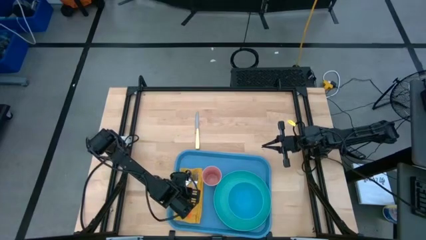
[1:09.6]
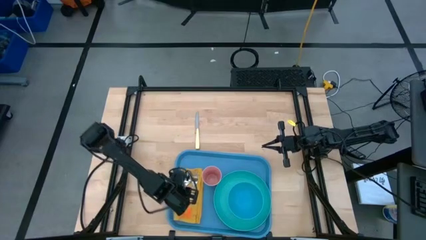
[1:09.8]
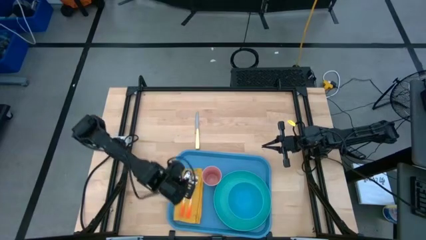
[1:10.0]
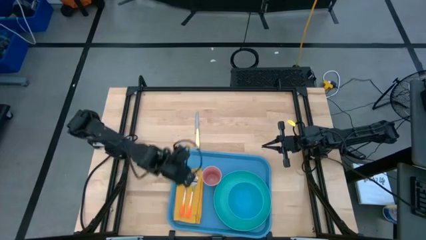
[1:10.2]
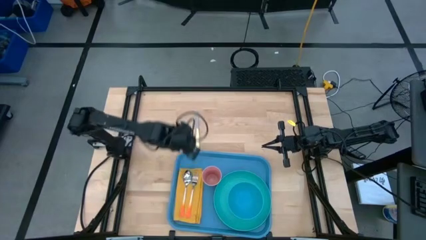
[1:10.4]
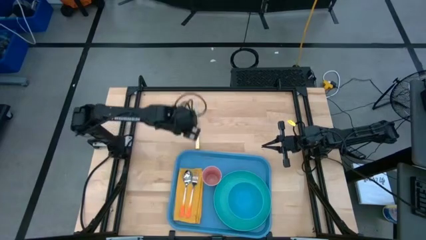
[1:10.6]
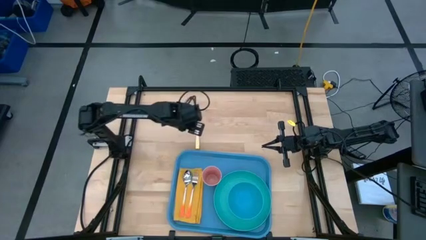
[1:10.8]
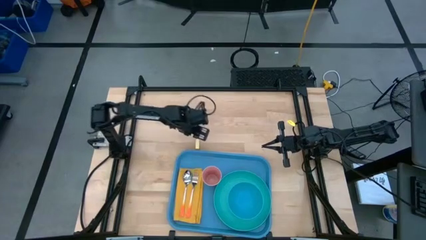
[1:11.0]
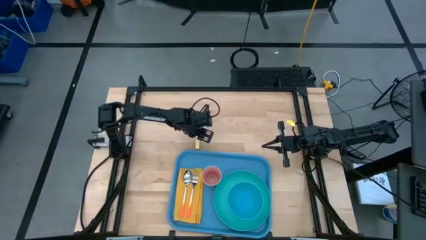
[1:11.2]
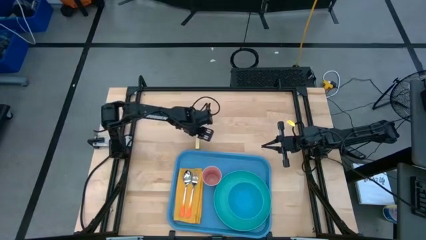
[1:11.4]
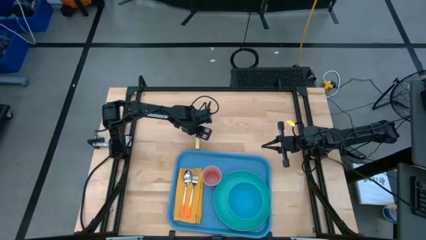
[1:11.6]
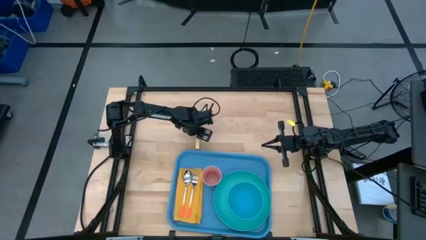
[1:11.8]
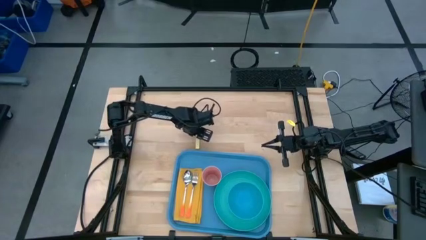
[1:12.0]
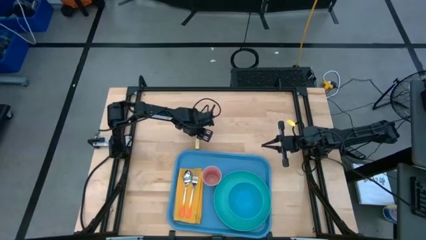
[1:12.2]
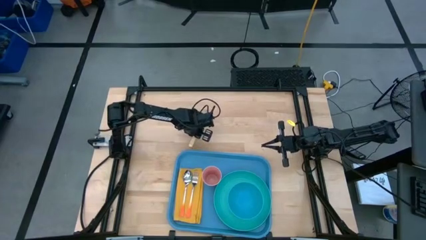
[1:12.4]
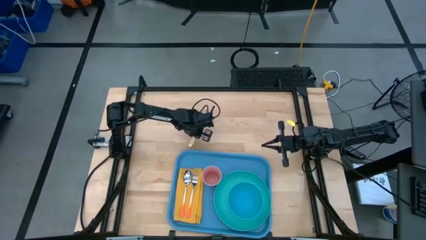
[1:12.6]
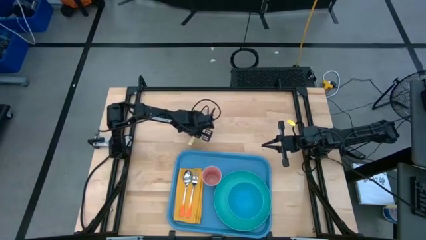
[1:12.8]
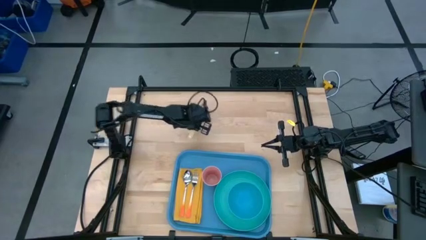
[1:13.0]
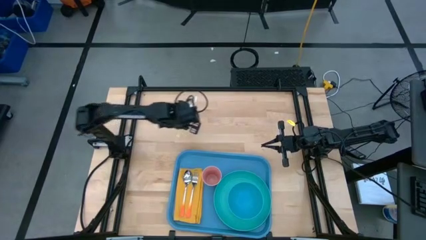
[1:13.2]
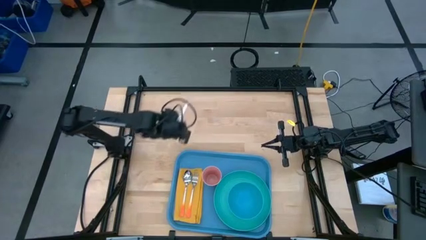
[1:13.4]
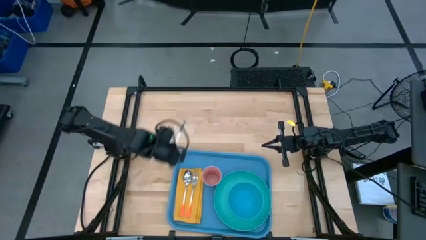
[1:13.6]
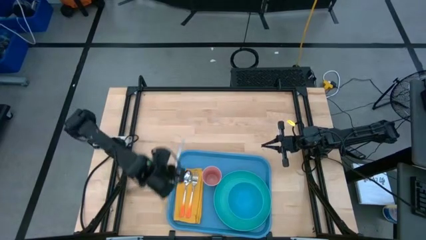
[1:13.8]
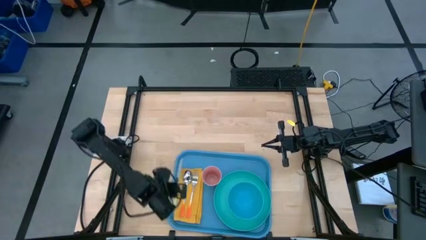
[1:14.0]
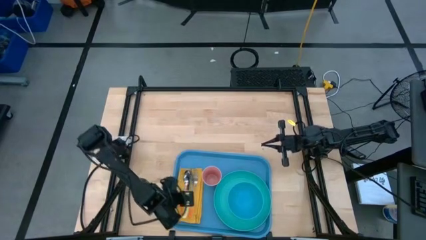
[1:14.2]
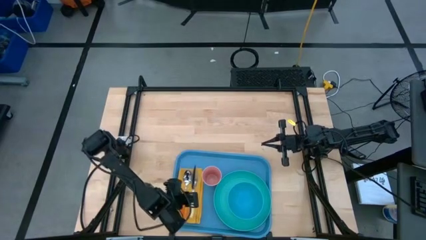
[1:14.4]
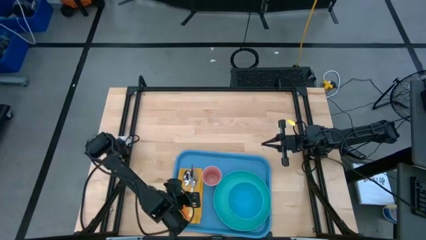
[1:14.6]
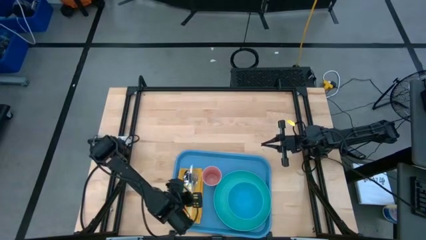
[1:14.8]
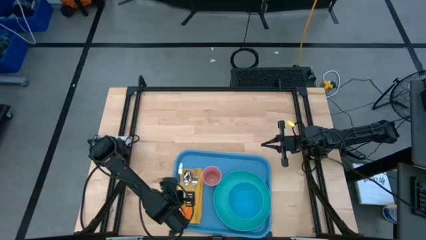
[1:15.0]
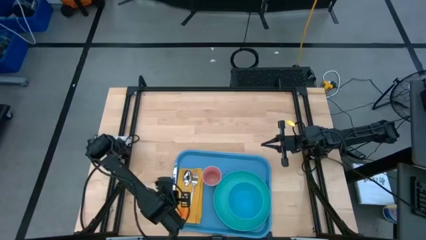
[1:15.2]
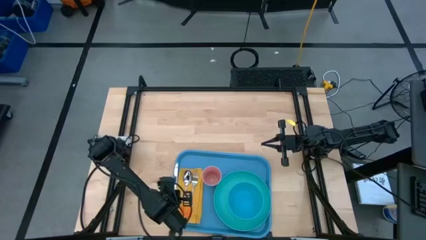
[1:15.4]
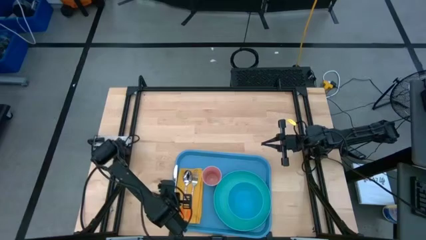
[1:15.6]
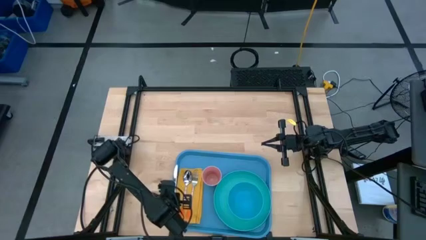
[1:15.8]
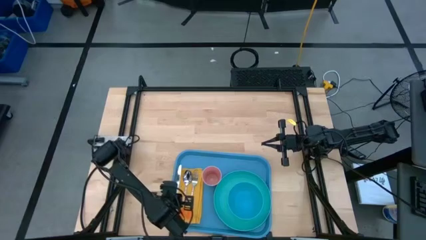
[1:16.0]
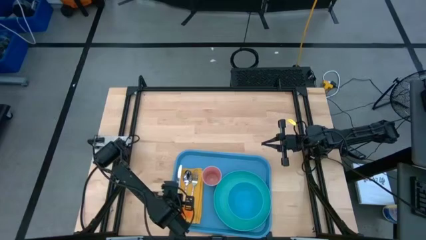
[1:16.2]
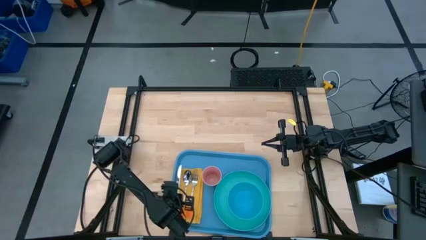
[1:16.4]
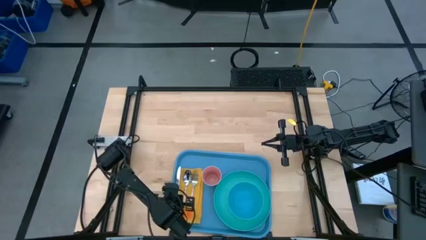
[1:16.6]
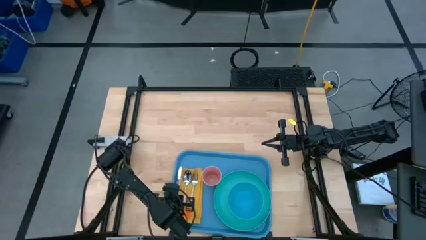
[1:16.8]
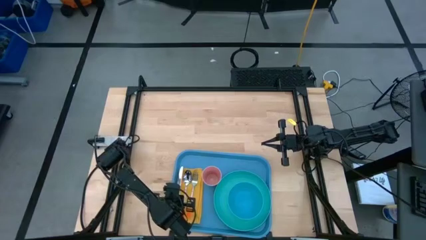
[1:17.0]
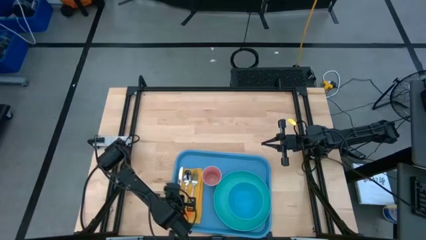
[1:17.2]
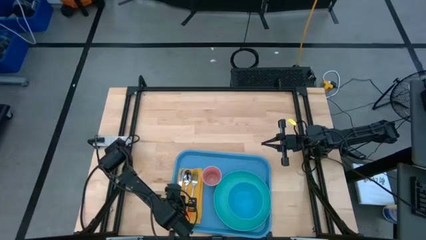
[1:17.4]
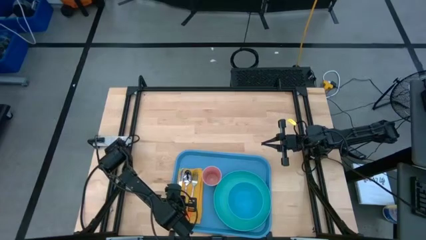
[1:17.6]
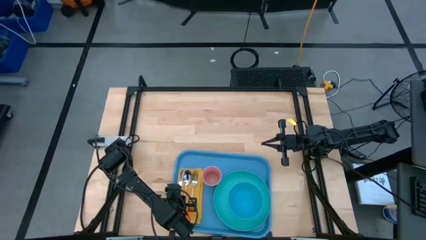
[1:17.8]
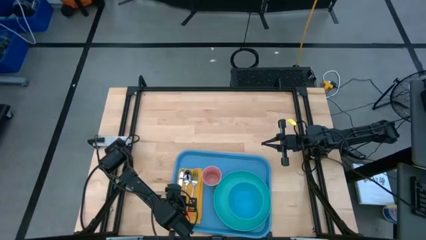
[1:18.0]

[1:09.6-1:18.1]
Task: Set up tray
Put the yellow knife to the left of the orange spoon on the yellow napkin on the blue serving tray

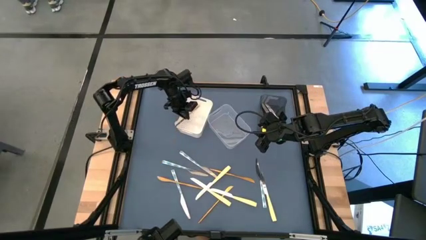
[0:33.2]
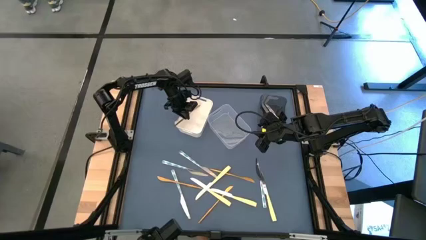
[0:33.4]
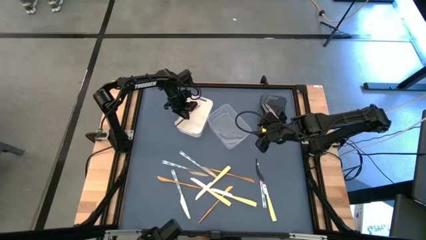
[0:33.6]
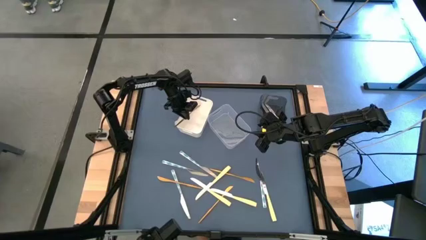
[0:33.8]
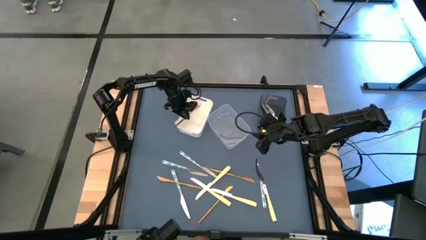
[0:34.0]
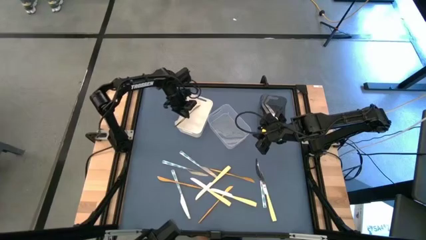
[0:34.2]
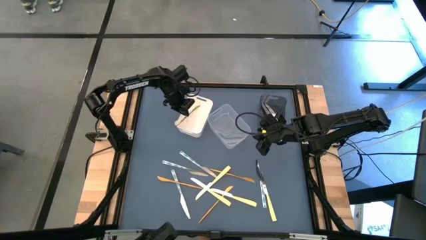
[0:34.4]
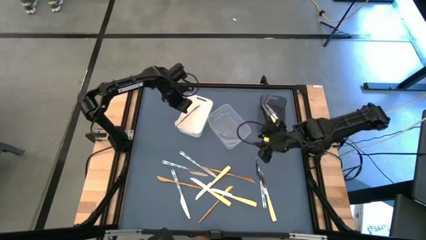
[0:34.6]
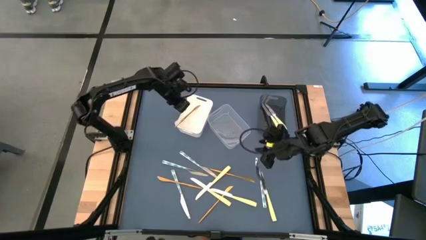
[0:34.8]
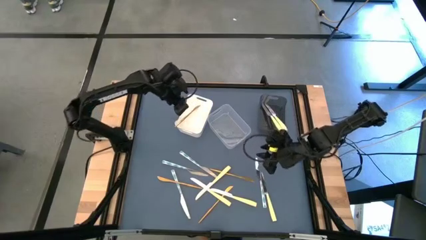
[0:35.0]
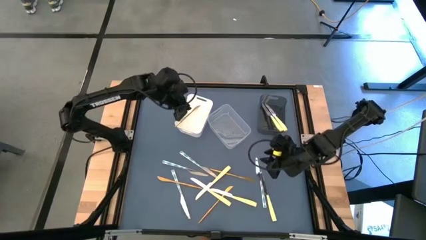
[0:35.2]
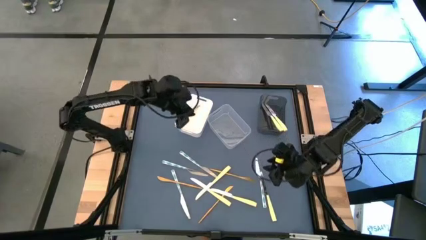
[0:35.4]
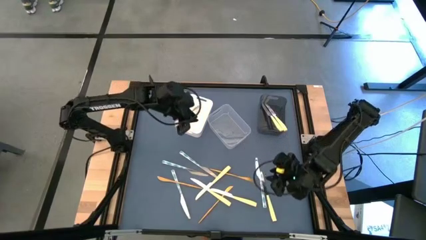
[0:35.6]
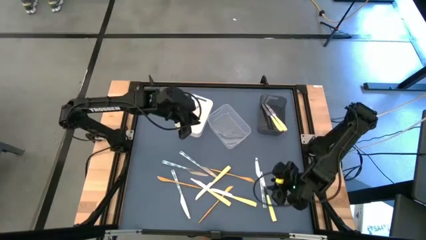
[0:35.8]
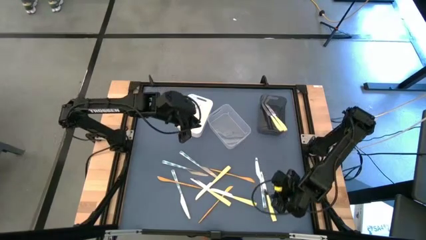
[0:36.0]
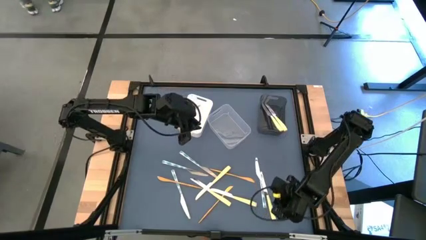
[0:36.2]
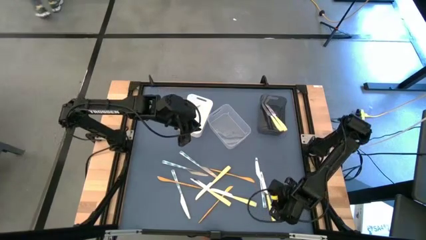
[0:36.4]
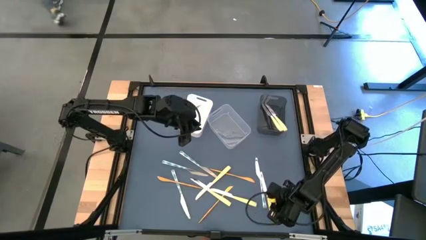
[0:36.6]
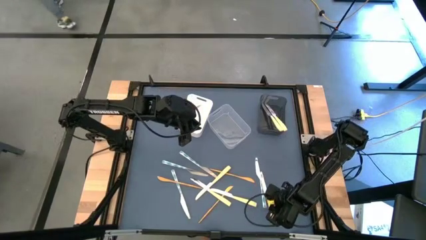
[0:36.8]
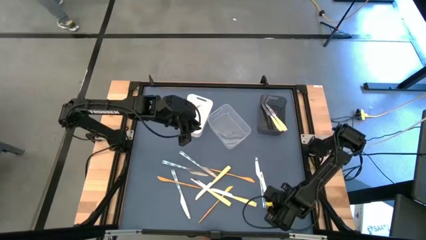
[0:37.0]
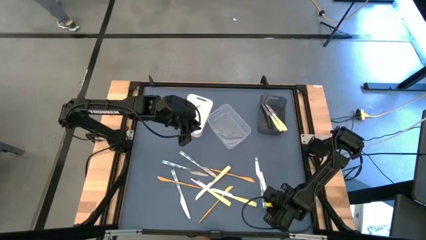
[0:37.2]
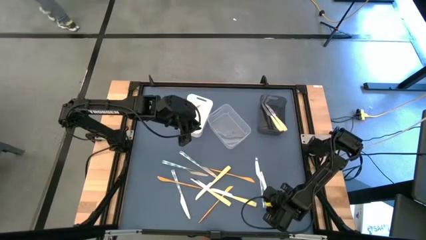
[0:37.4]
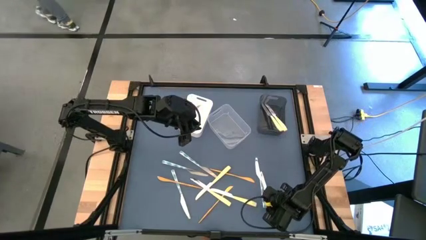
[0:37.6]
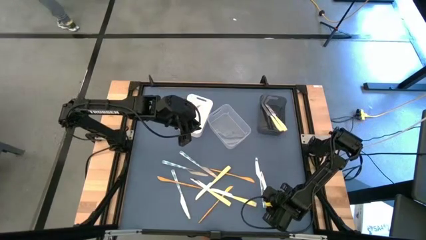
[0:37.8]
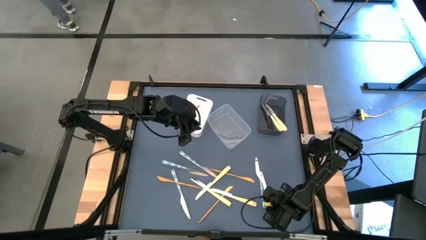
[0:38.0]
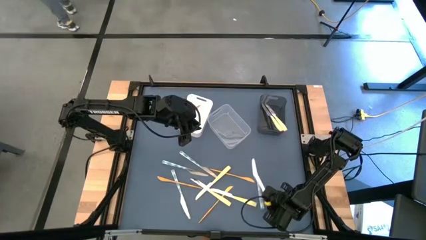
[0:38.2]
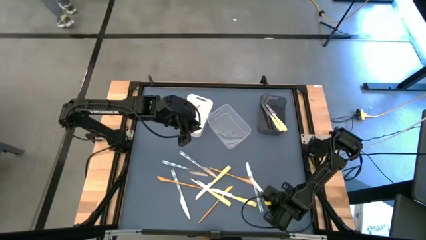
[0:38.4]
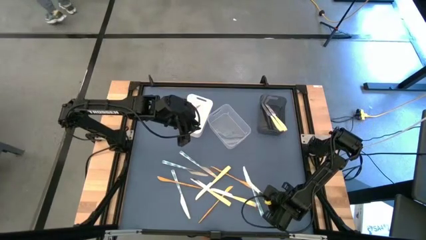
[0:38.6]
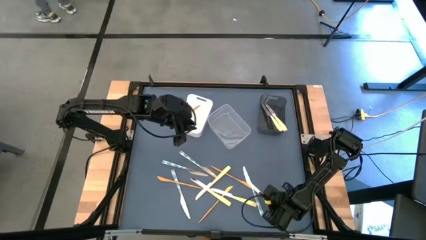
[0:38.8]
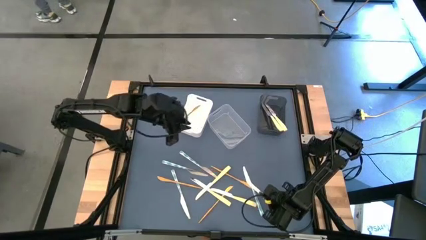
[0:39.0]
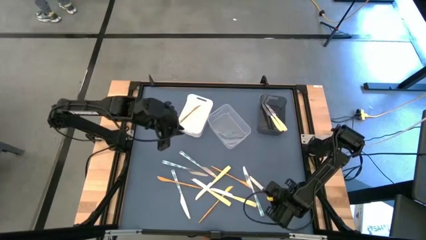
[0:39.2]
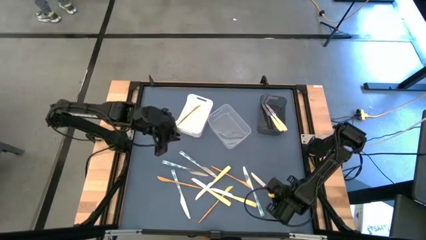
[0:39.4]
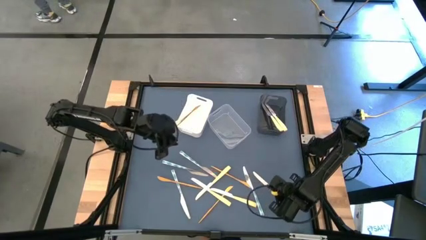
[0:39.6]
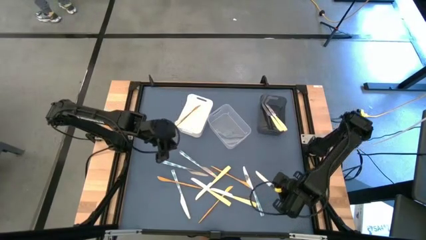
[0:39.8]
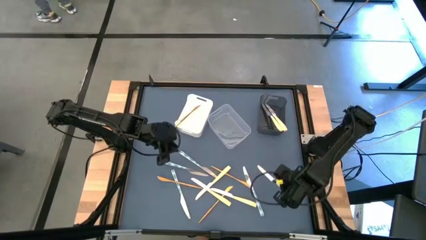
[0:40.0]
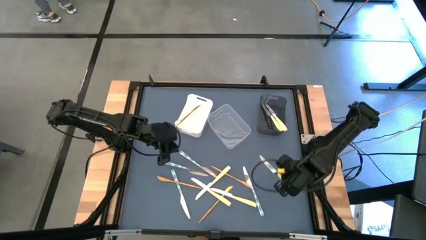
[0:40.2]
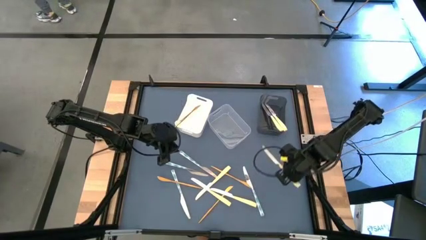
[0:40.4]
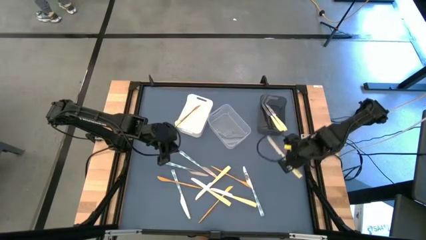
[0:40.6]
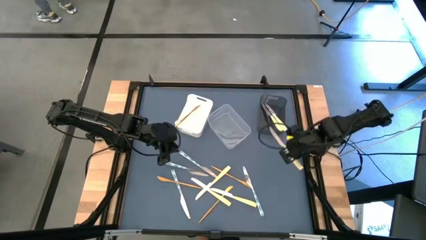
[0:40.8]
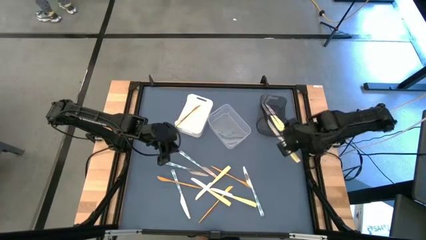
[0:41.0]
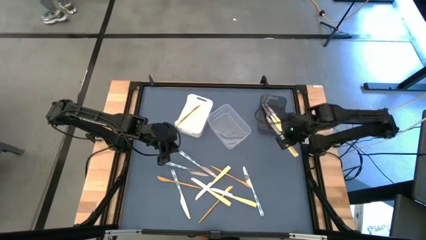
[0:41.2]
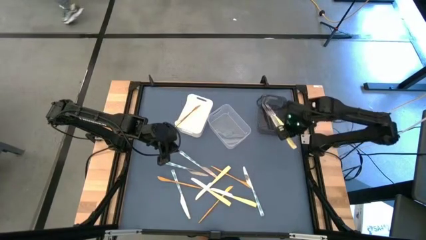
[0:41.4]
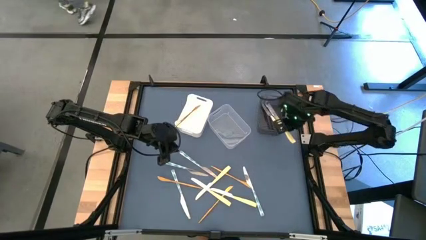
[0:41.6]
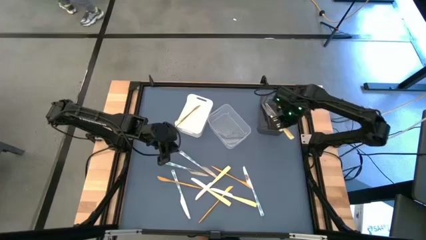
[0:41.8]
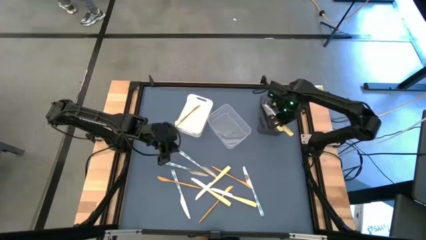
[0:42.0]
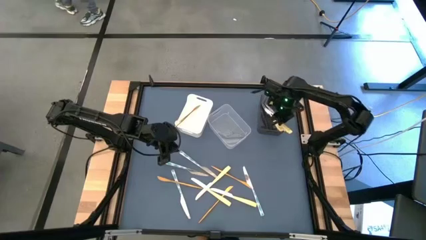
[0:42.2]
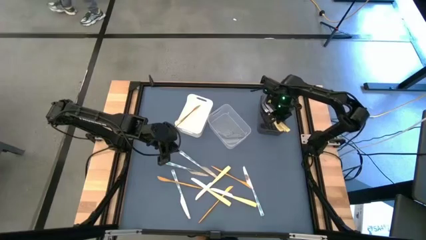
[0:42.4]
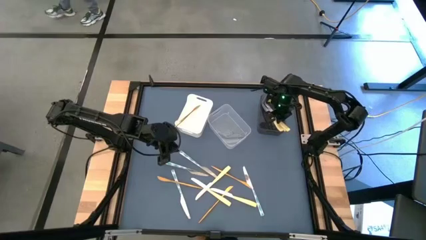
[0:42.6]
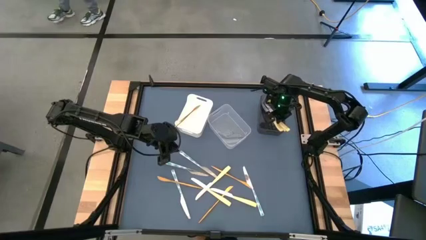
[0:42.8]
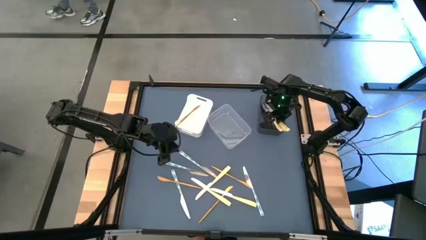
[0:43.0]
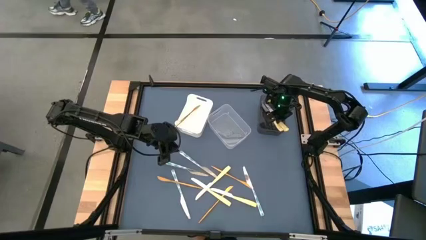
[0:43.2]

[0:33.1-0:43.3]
Task: Sort silverware by color (type)
Put the yellow knife into the black bin
